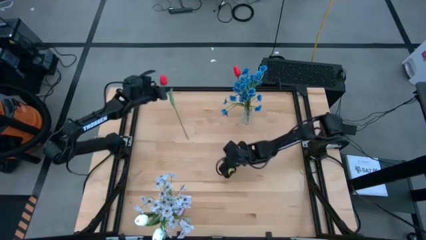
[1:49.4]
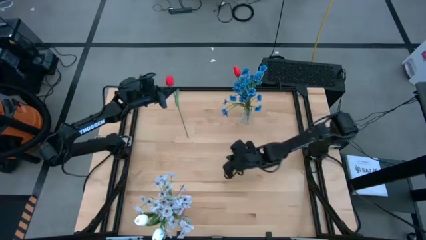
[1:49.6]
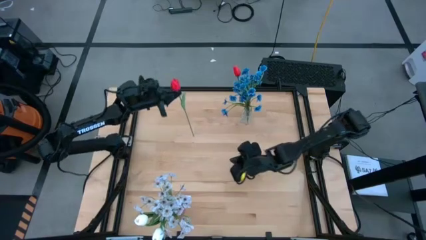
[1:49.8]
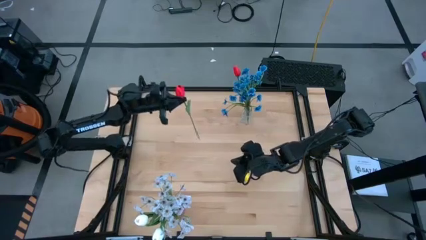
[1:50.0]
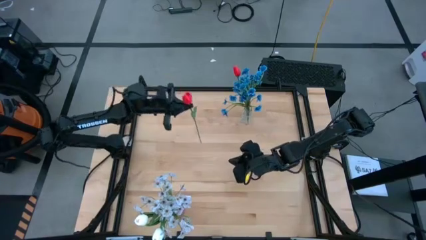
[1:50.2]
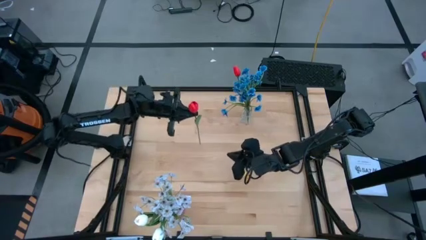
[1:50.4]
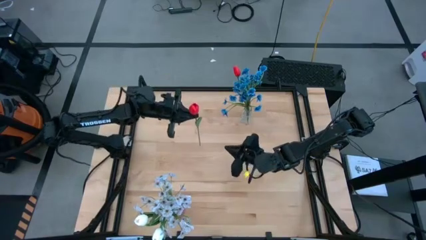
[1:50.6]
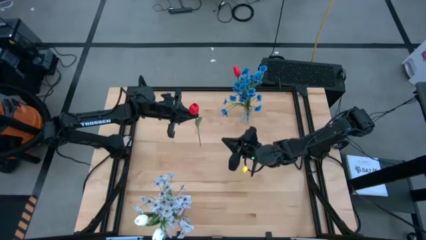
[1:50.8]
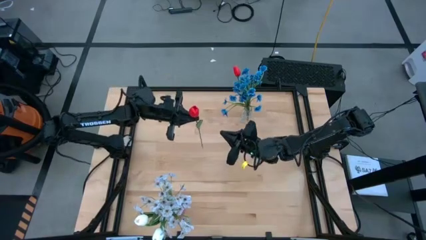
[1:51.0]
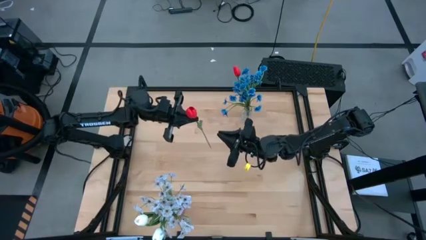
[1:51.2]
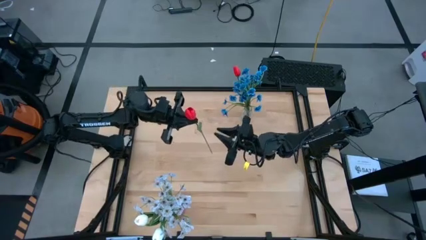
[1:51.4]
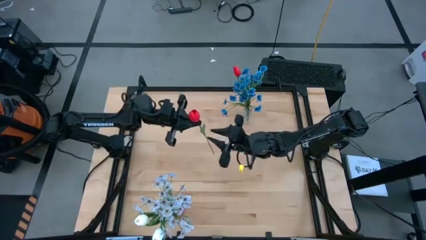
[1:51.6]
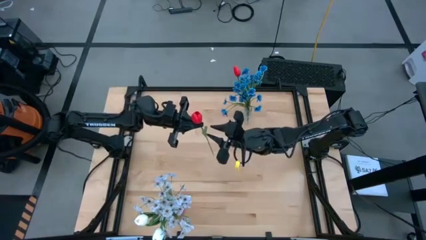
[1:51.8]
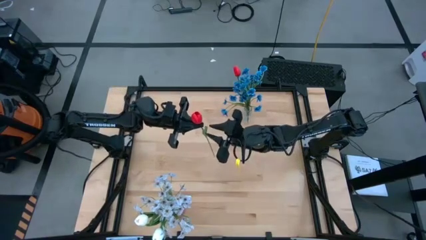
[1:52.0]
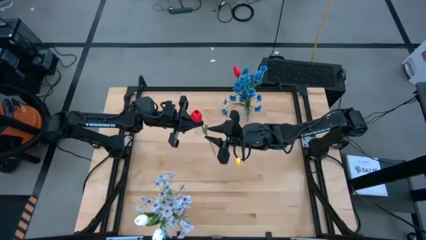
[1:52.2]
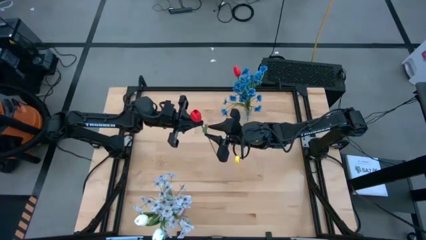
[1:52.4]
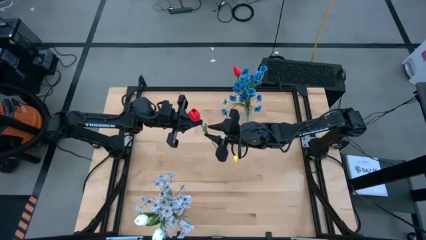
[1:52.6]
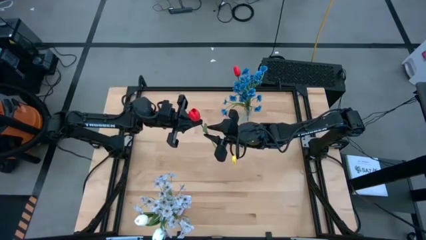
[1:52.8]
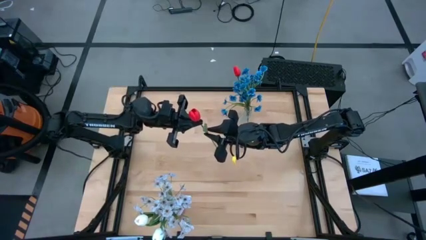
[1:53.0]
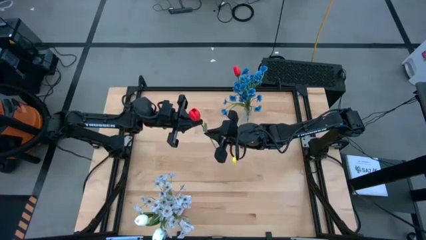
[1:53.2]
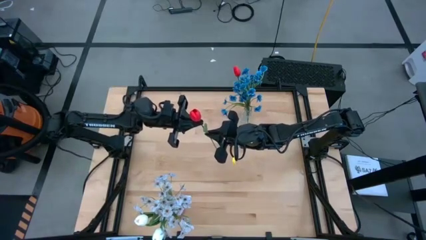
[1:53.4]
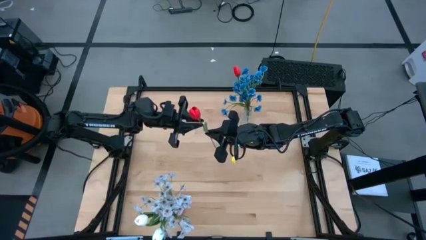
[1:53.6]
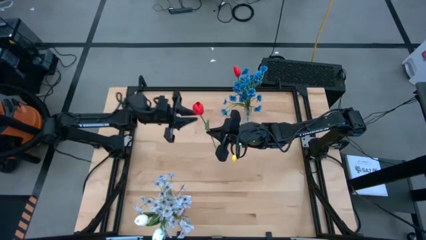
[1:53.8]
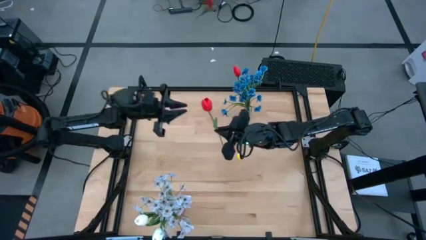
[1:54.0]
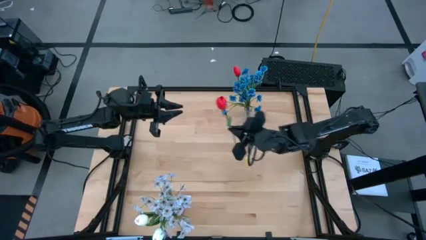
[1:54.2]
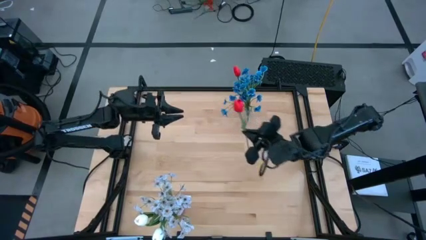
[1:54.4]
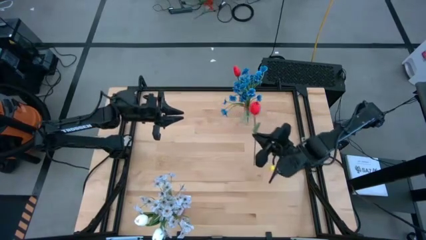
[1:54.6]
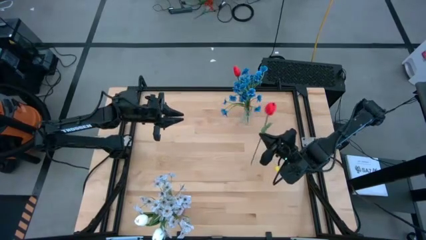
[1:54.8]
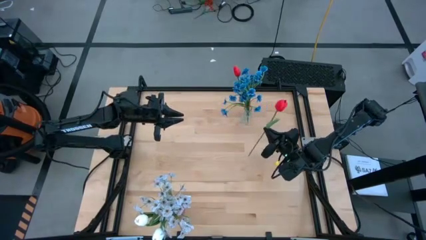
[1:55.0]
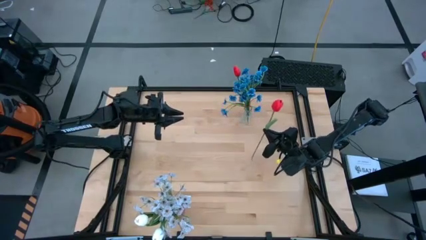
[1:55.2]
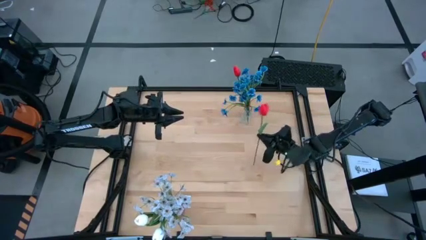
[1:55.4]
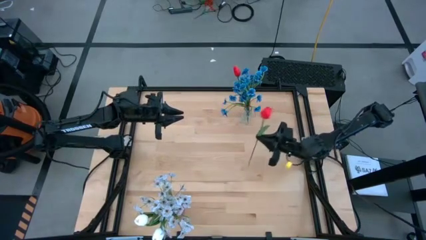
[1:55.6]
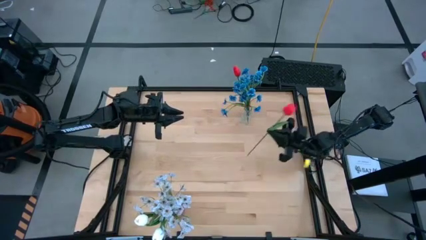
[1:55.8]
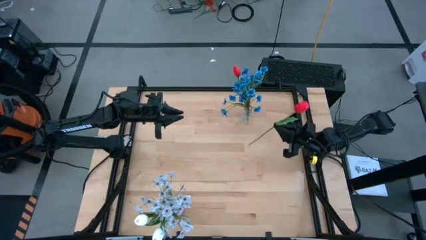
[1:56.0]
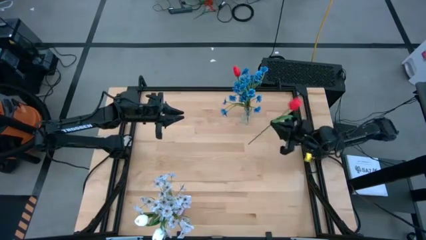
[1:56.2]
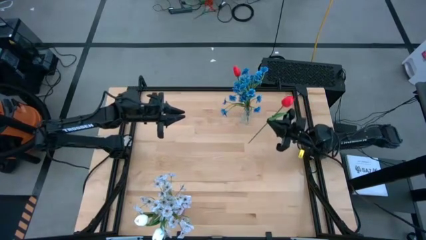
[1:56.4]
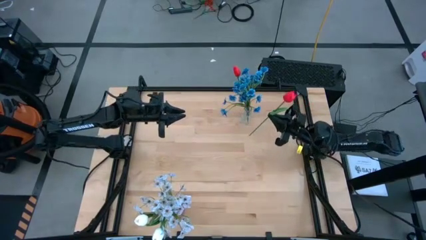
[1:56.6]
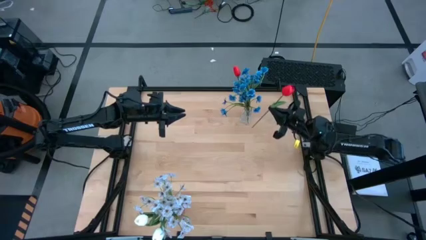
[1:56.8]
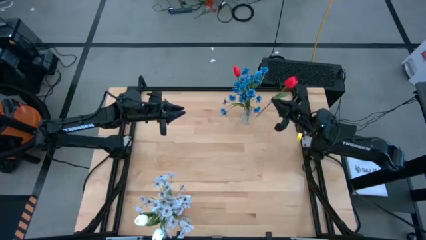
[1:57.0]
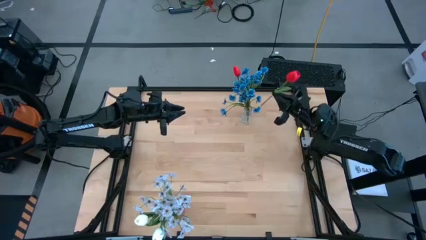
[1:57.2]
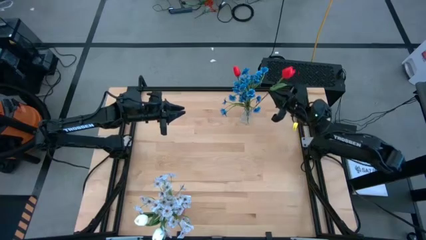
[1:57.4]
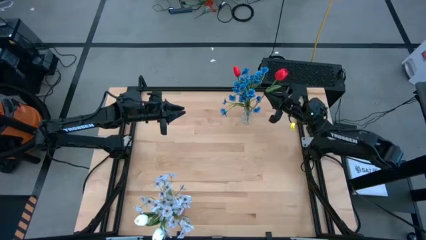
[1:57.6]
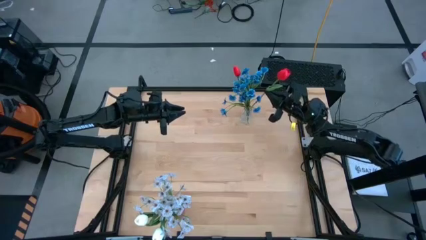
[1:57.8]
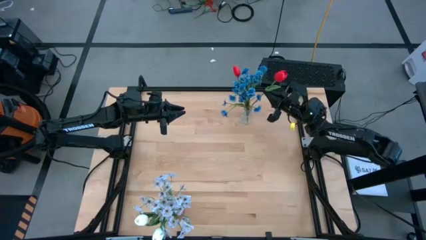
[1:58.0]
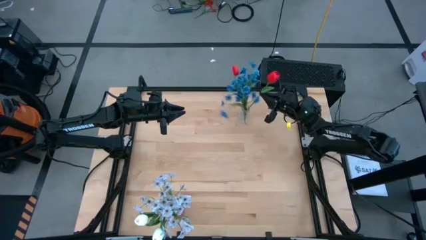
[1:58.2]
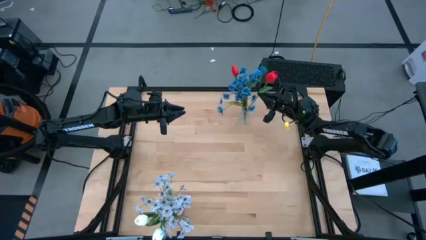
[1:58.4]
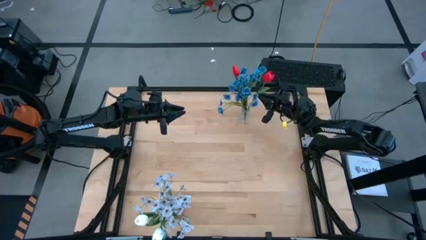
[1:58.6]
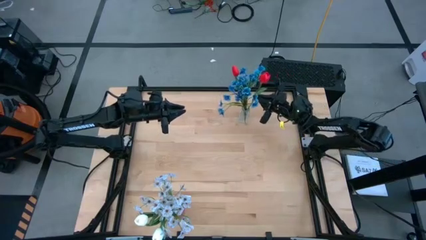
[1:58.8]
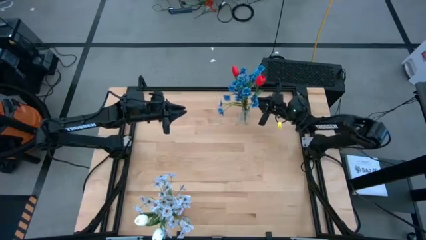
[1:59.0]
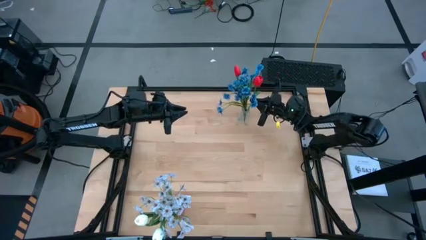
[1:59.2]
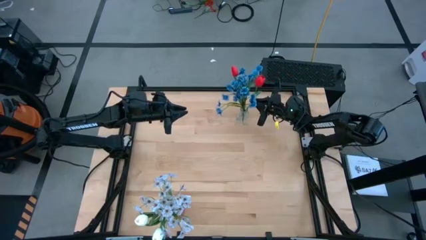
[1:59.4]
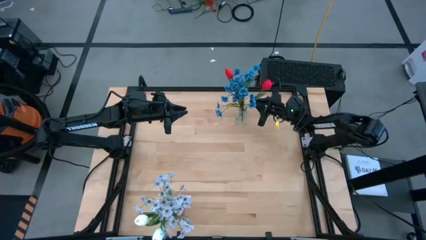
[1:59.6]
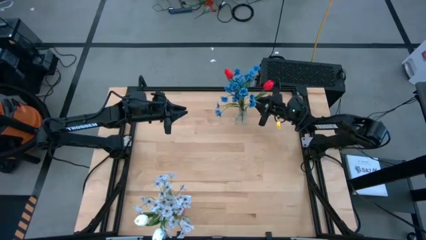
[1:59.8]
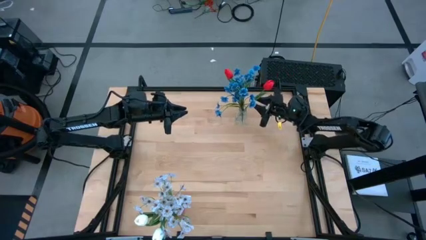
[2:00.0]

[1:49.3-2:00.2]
Task: Sort flowers into vase by color
Put the red flowers into the transparent vase

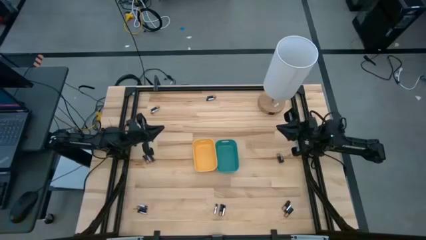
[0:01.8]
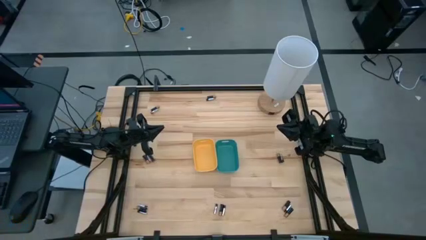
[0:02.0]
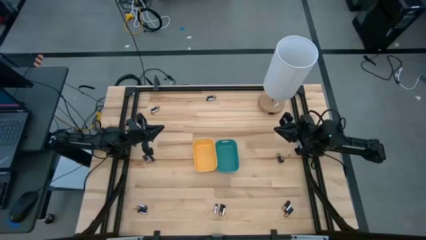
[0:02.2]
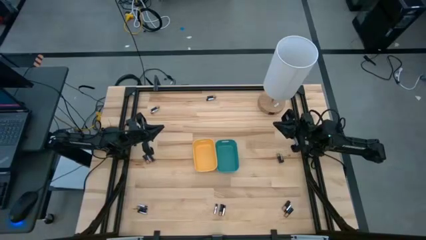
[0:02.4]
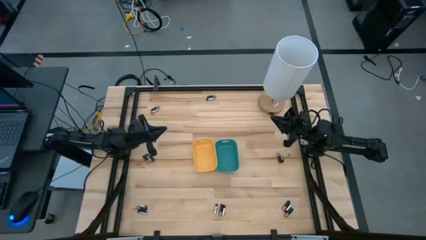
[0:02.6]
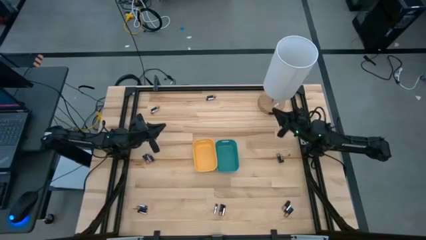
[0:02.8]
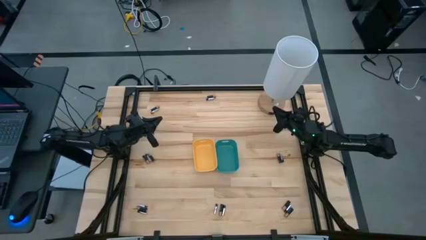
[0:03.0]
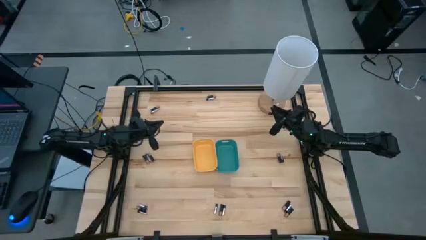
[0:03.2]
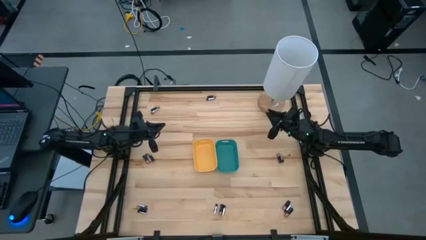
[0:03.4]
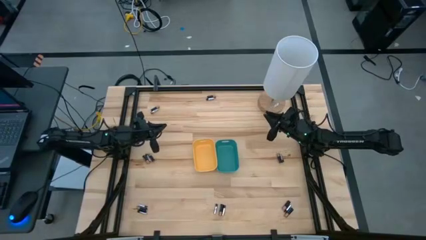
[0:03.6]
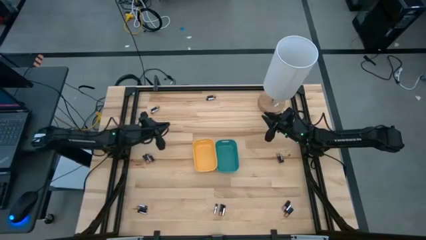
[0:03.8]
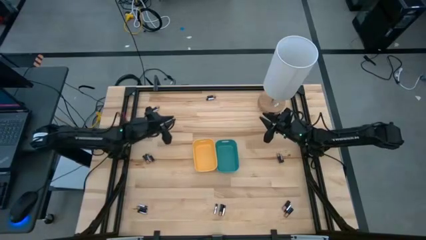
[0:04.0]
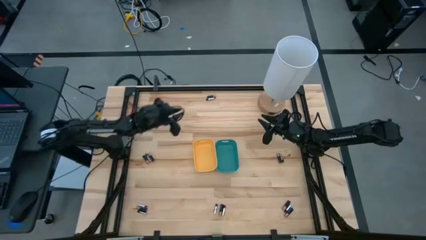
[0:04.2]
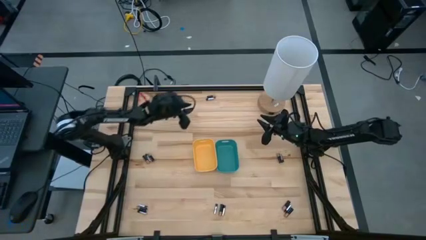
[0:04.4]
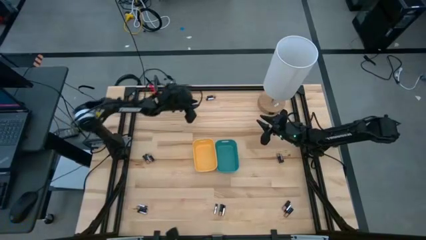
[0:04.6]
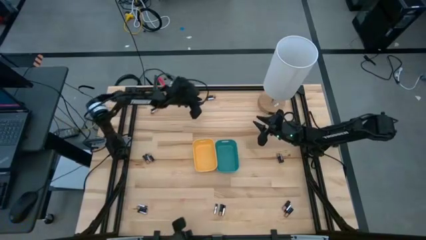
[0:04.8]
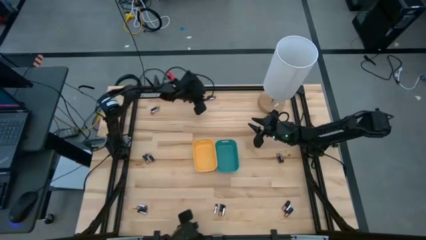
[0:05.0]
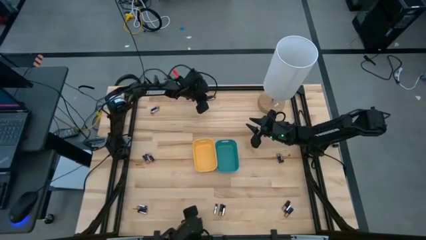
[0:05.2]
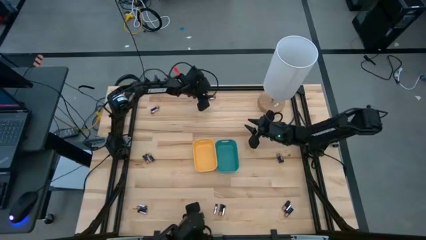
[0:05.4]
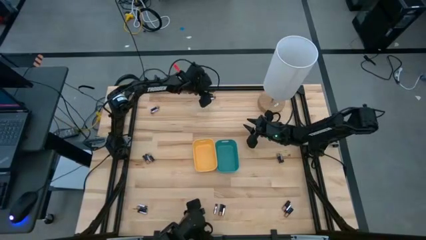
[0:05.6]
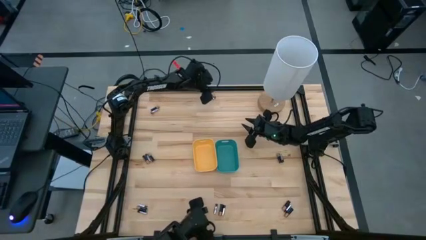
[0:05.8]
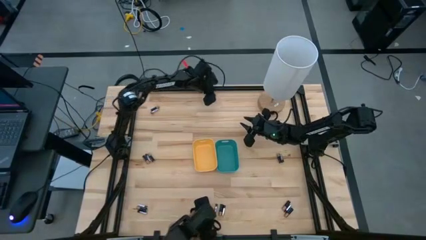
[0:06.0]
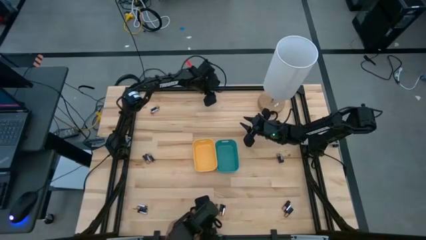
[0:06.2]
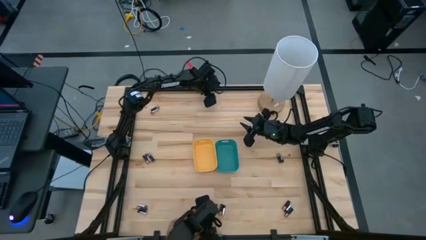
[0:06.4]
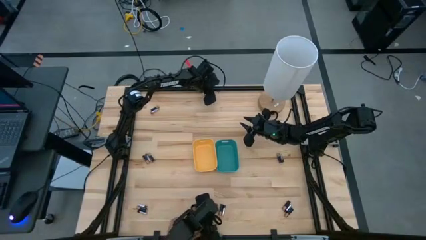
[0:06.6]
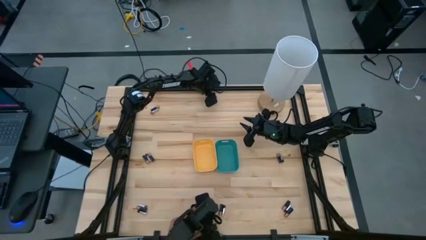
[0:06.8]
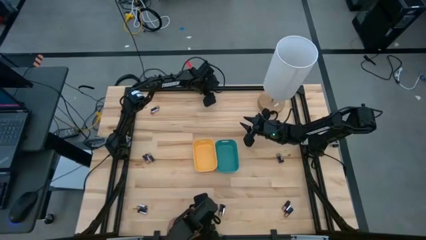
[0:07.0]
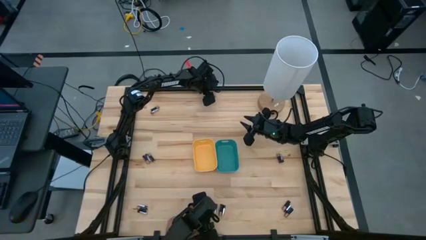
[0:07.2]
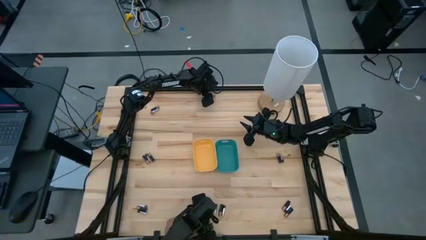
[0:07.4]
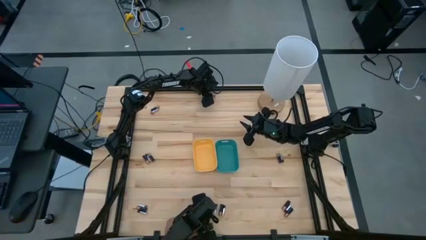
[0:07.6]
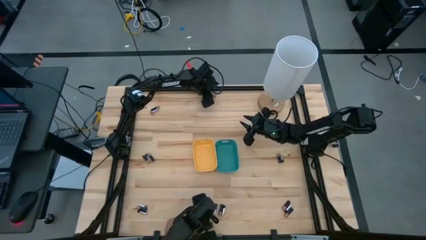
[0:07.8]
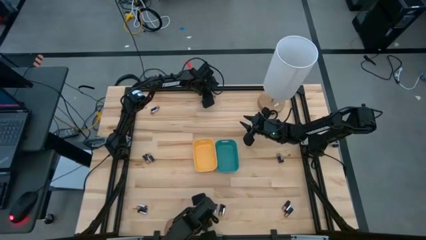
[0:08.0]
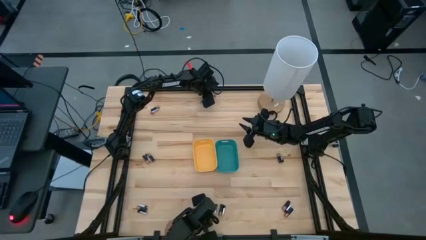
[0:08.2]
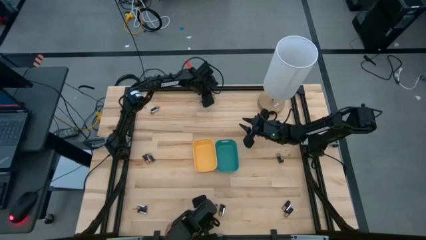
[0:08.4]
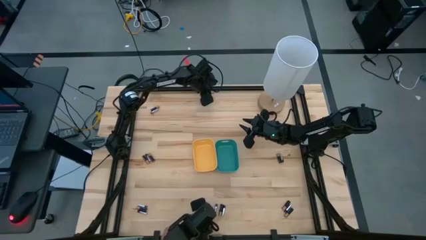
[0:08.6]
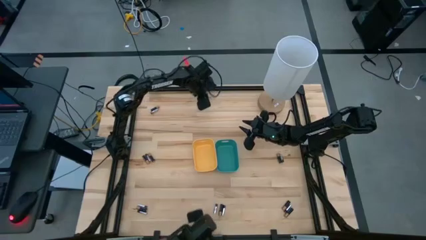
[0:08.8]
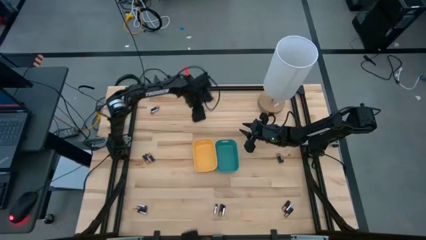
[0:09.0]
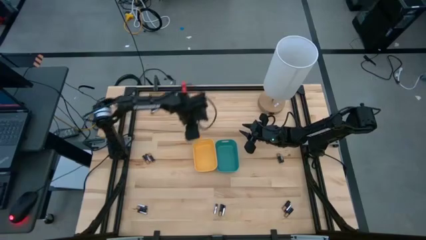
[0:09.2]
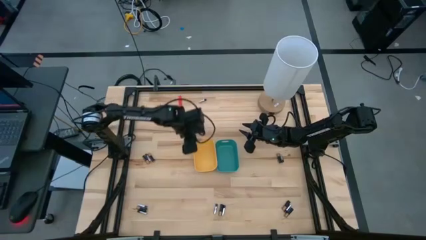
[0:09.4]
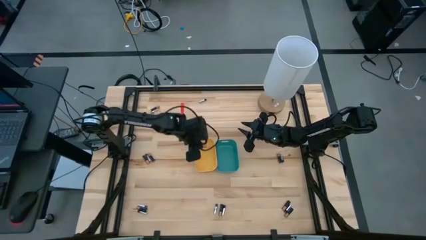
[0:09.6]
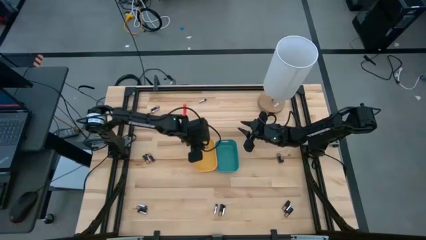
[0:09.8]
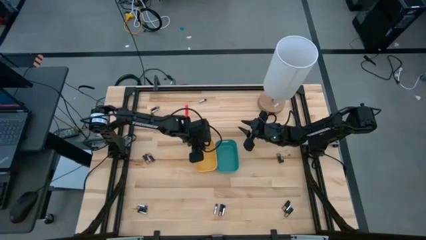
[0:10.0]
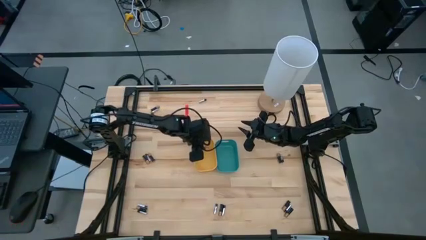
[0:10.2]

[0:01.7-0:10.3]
Task: Sort batteries
Put the black battery into the yellow bin
